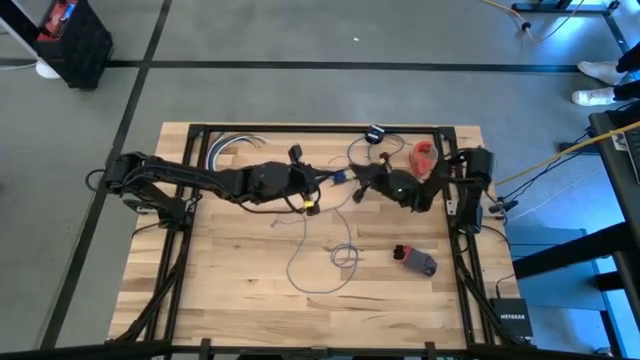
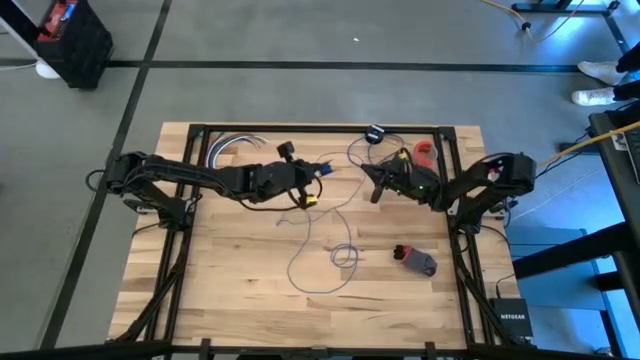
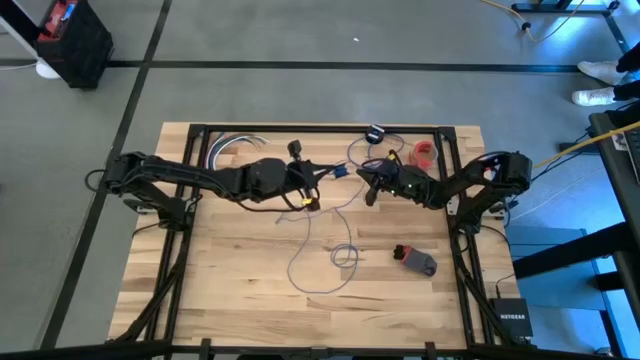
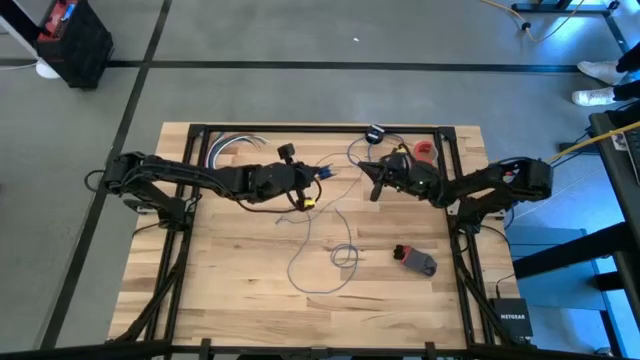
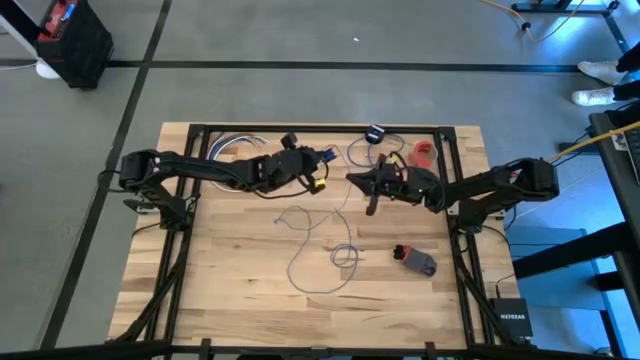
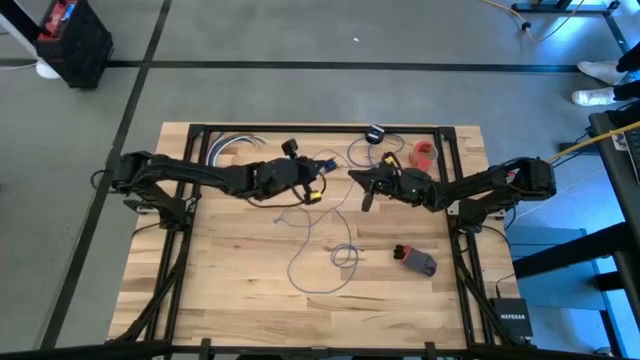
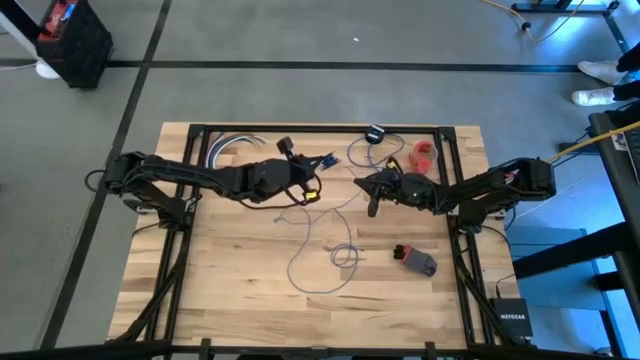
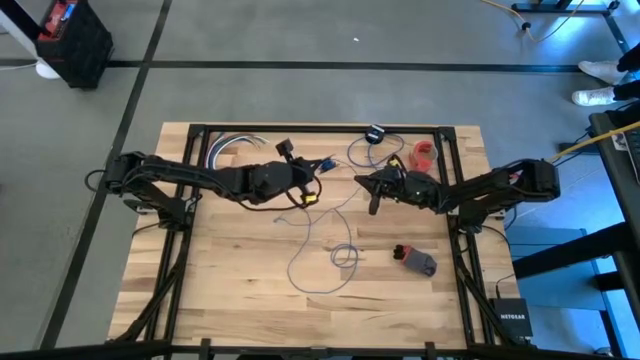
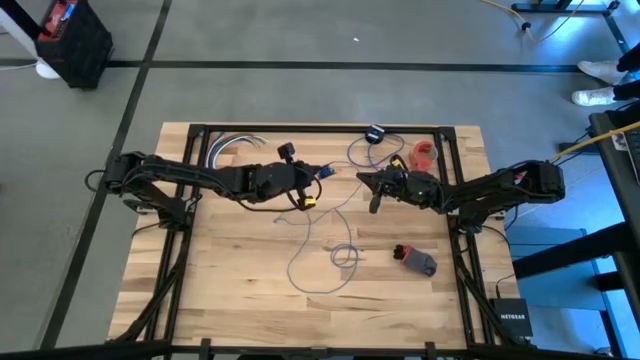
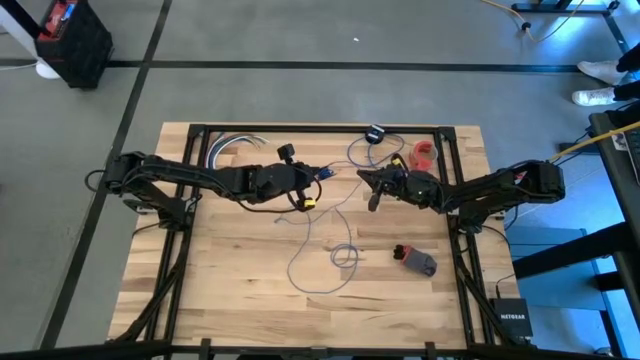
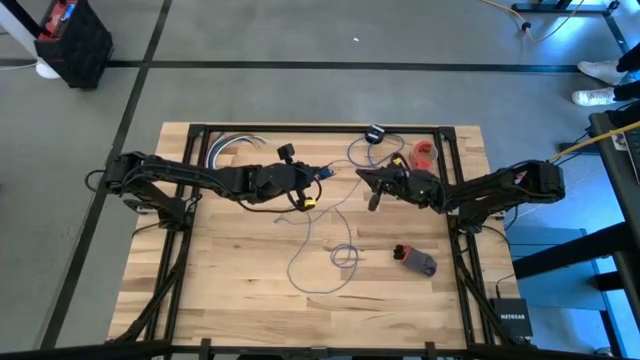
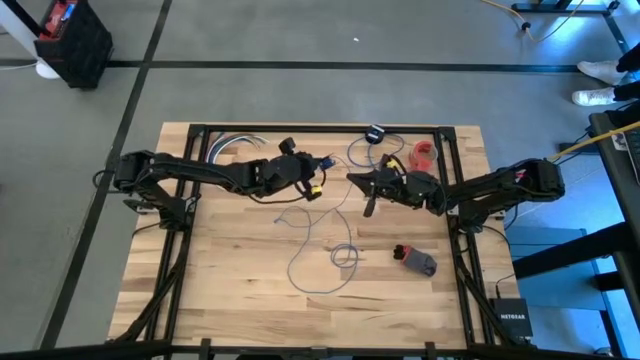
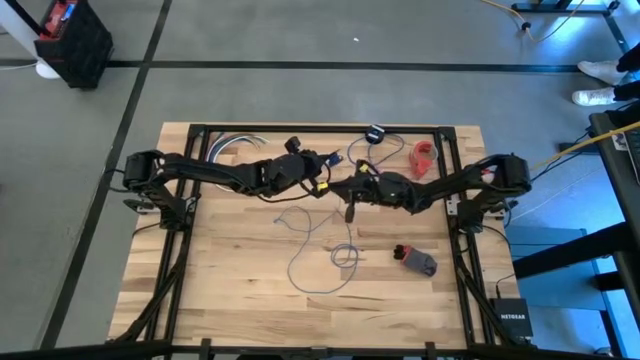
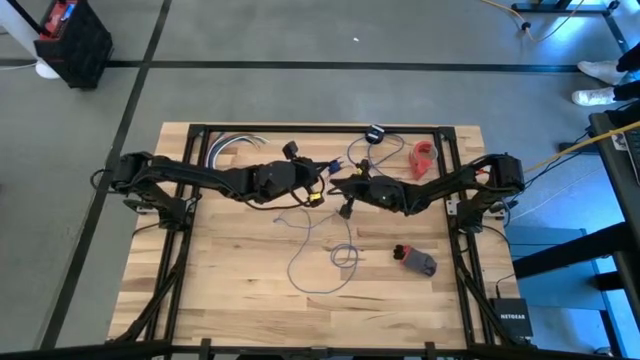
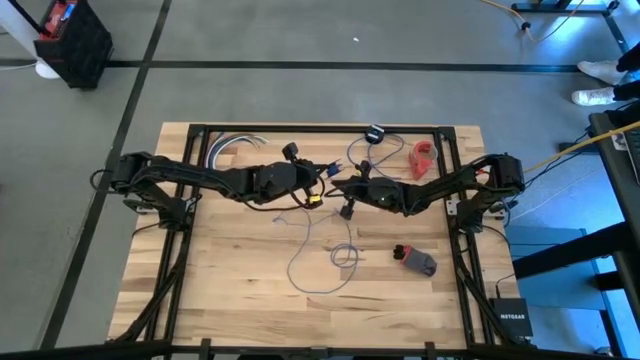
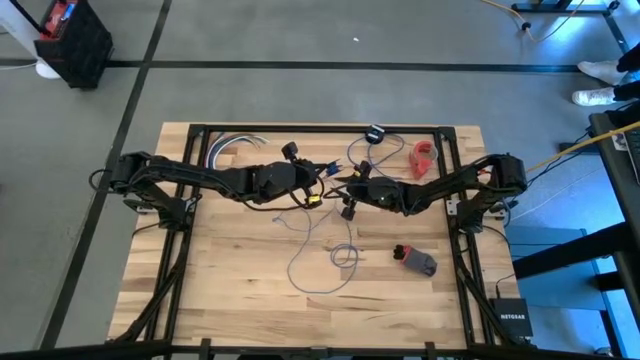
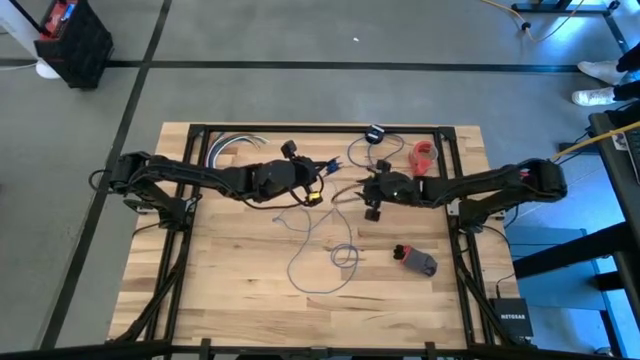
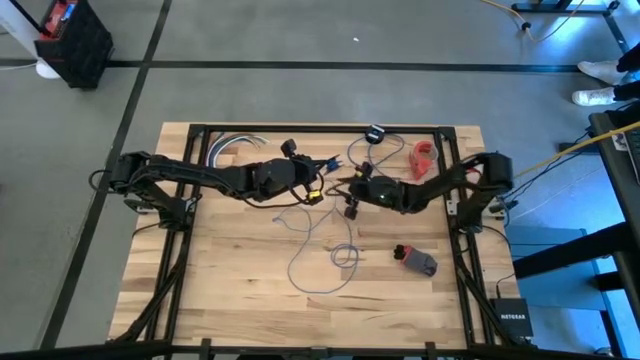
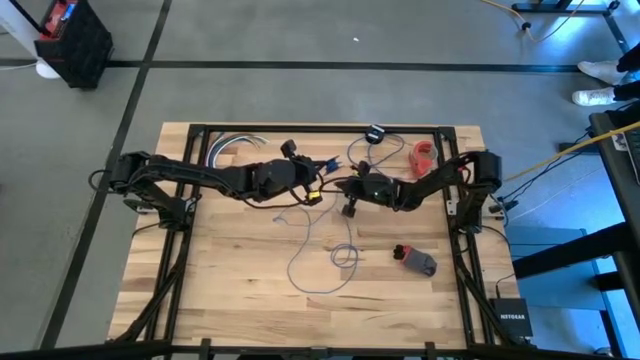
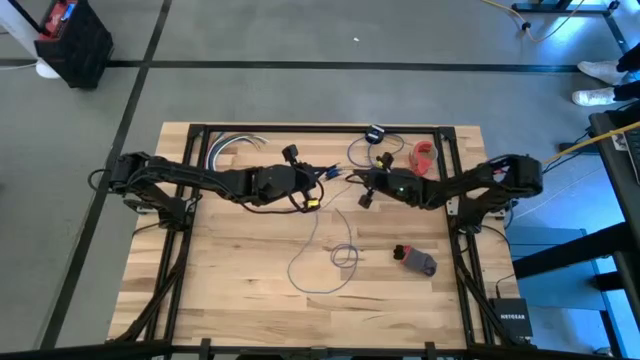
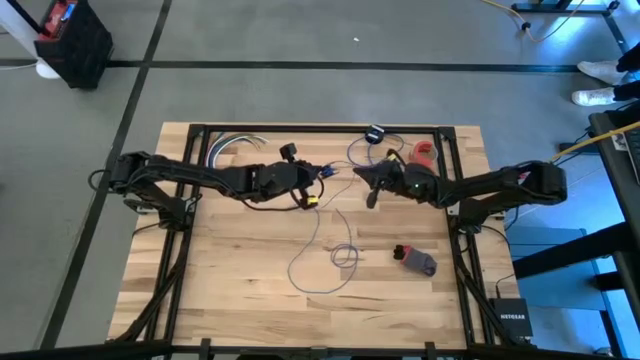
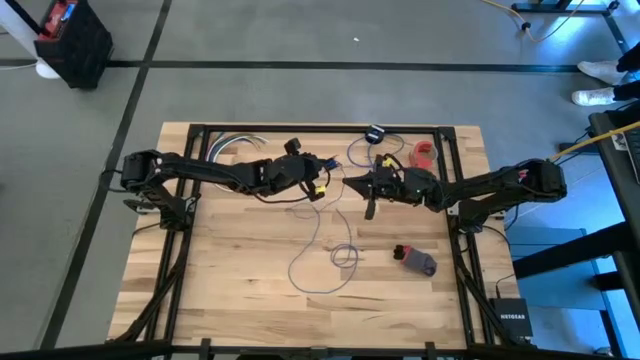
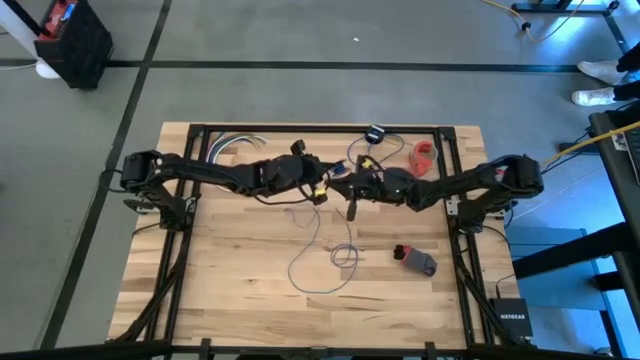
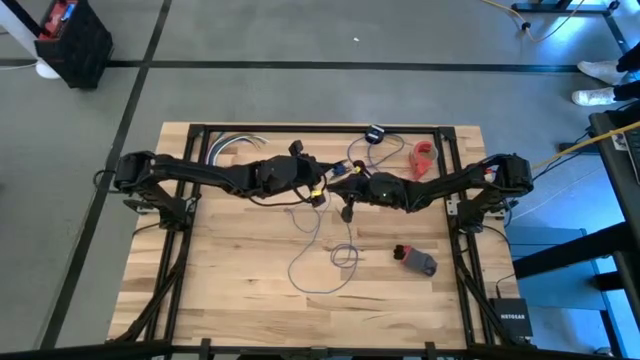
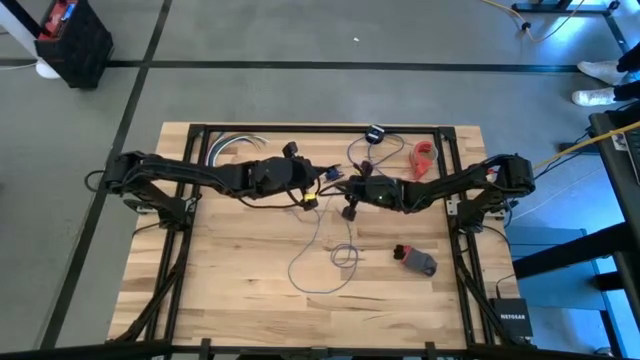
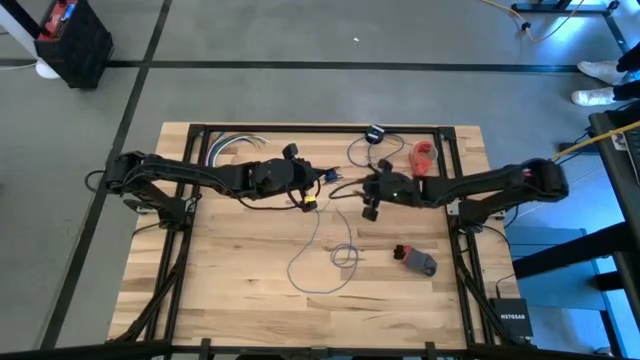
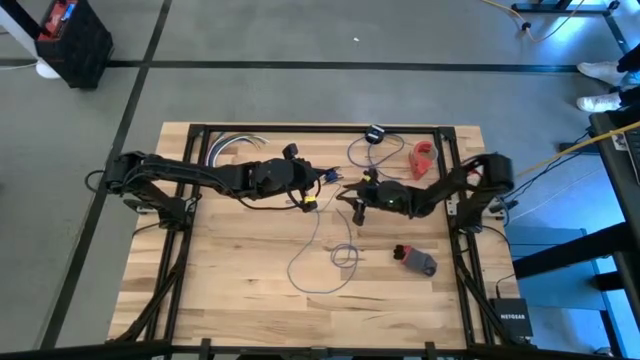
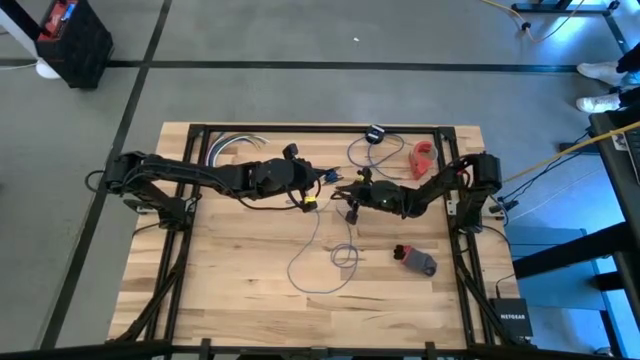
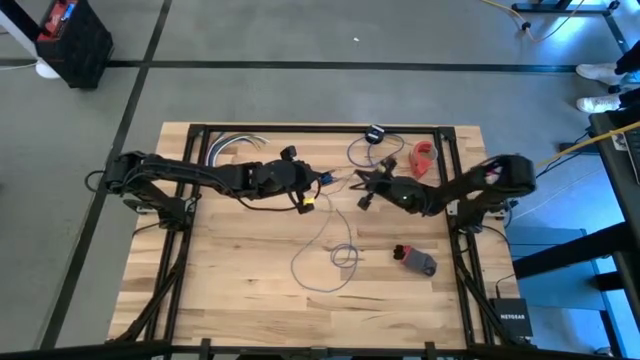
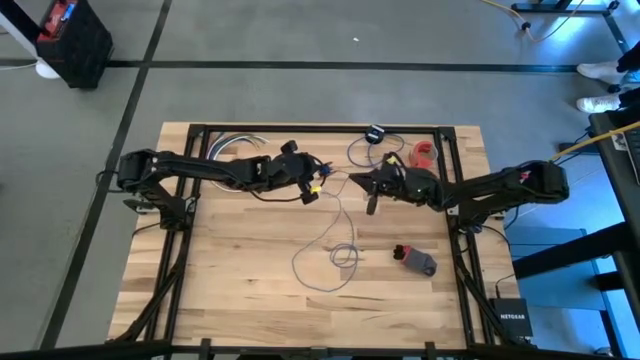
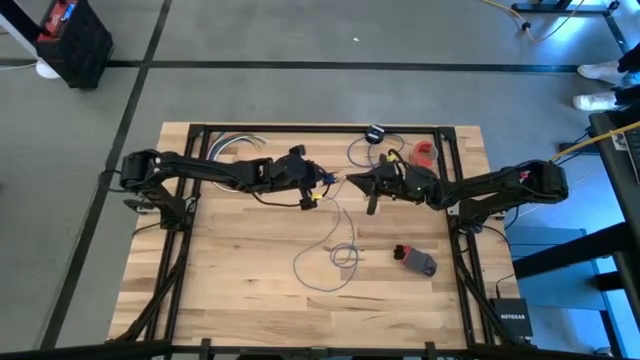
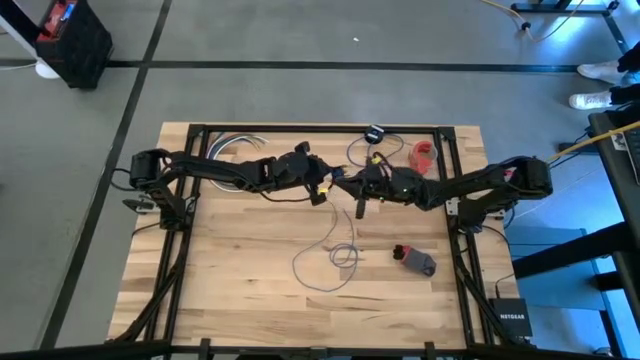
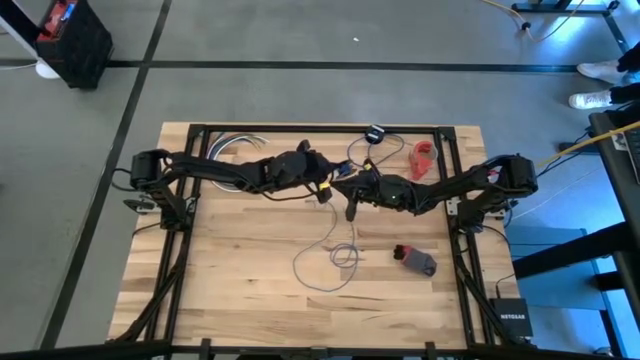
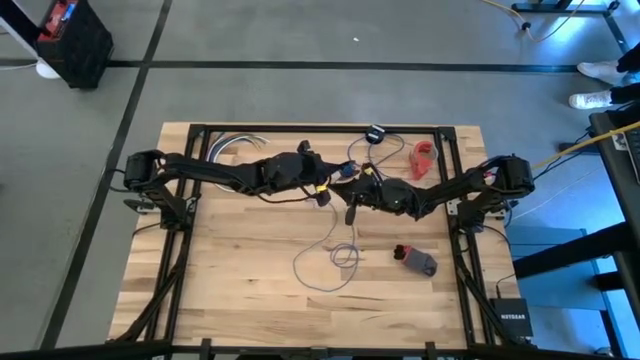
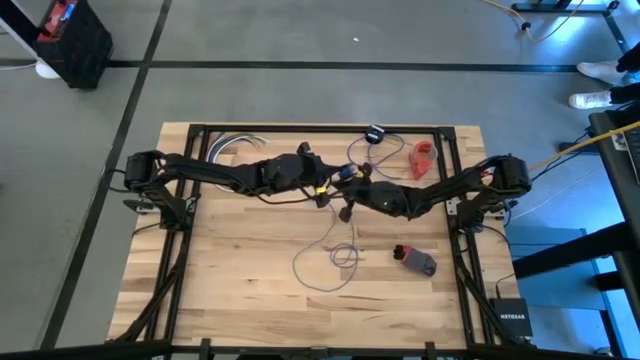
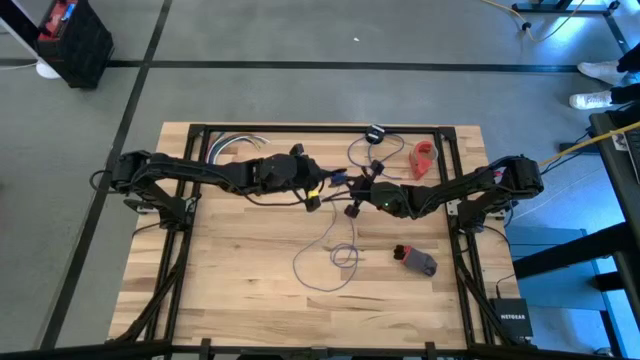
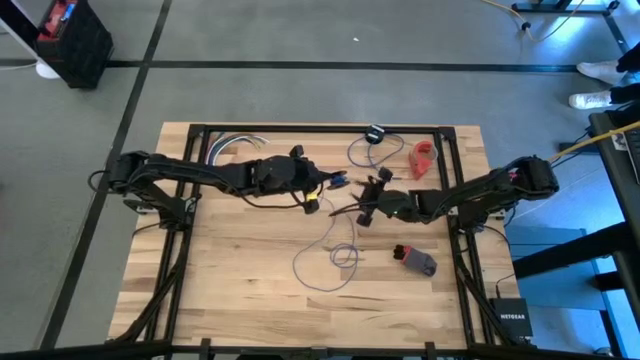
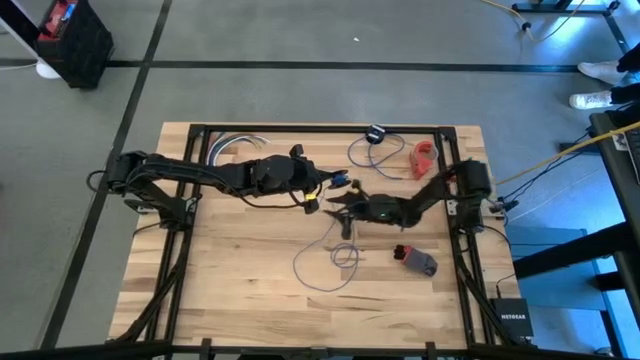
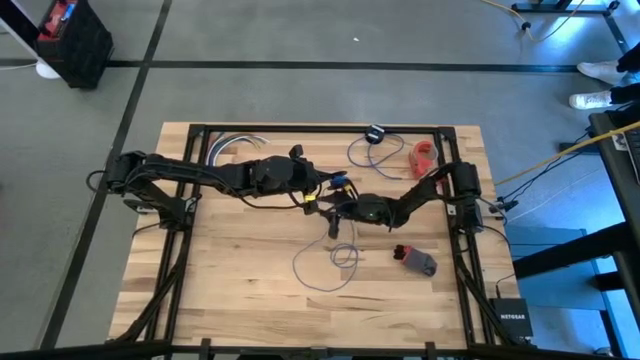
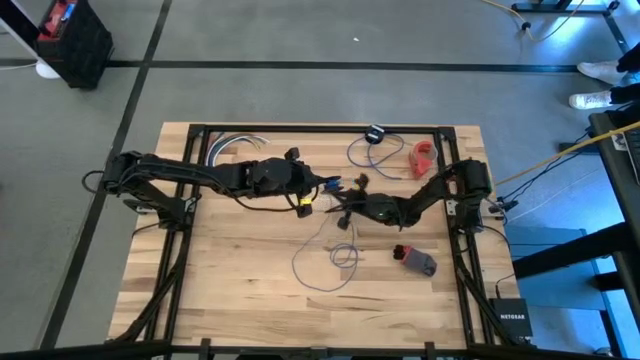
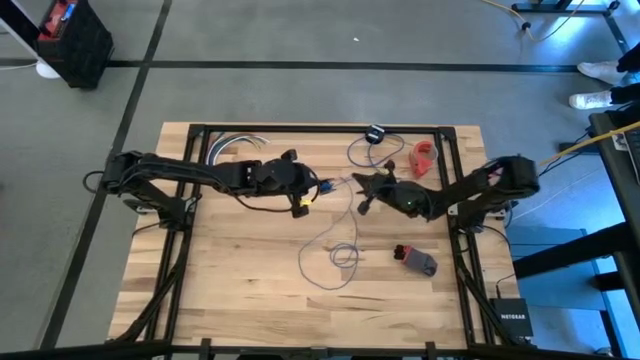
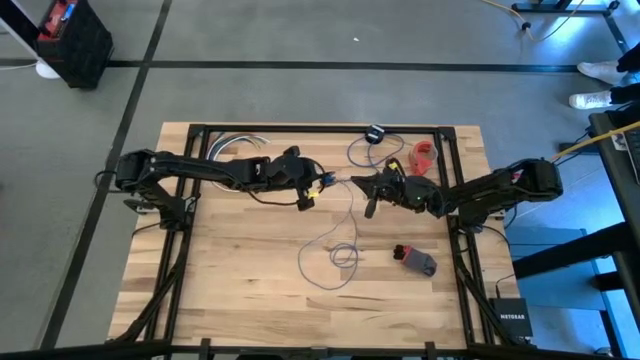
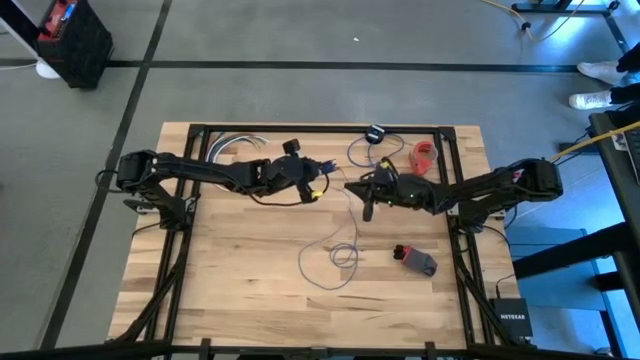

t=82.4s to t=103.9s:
Task: Coil cords
Coil the blue wire onto the spool
